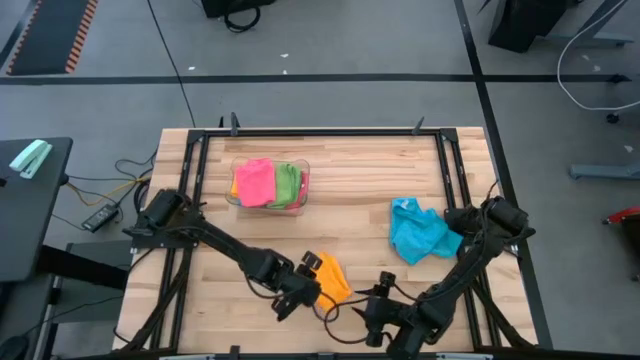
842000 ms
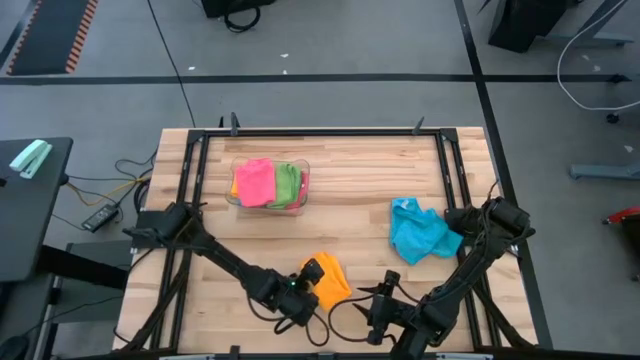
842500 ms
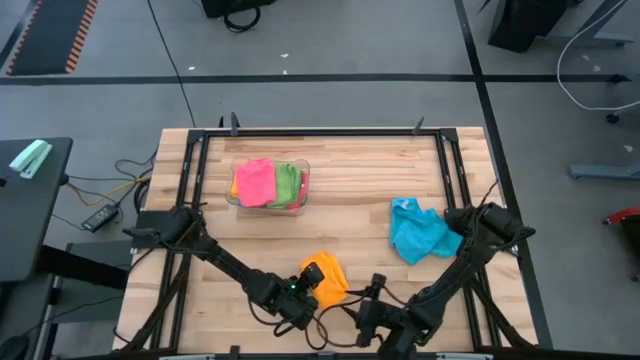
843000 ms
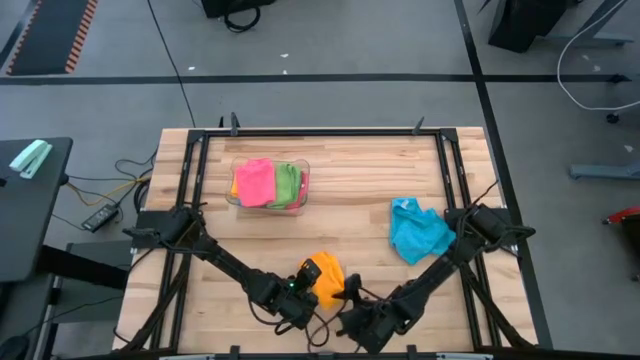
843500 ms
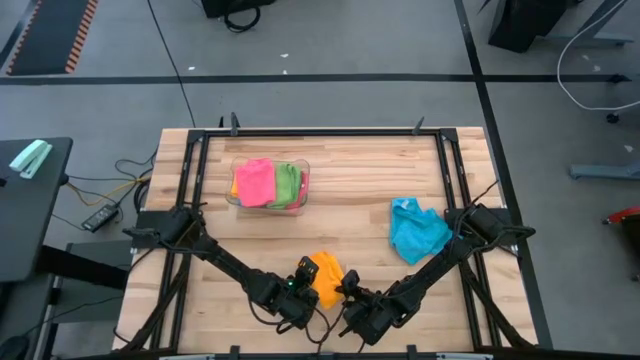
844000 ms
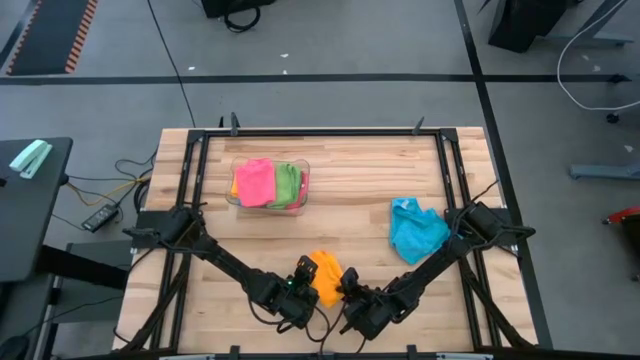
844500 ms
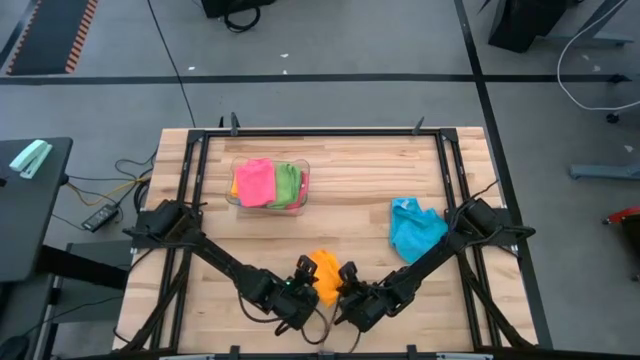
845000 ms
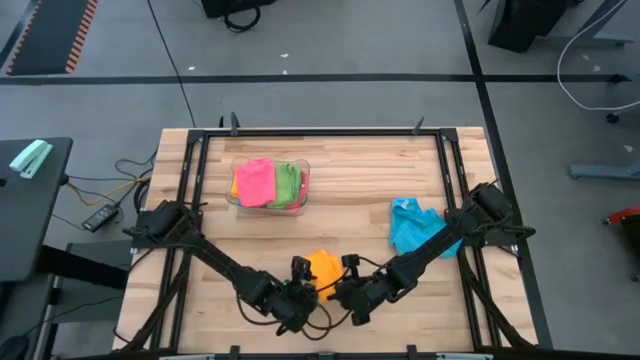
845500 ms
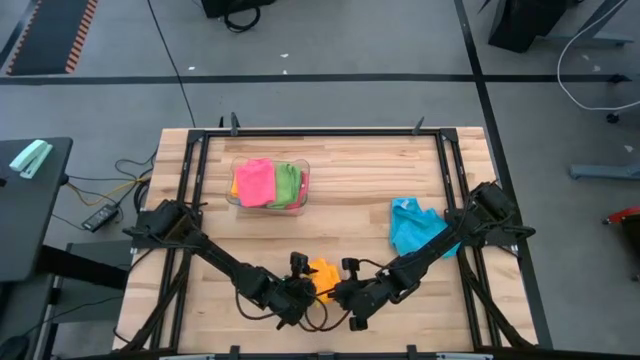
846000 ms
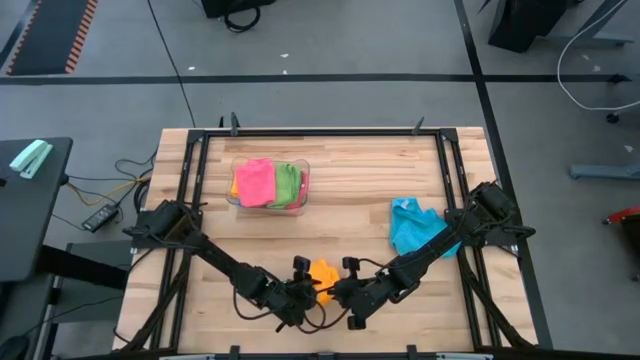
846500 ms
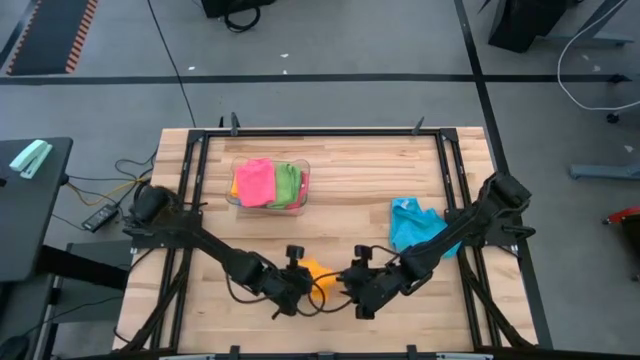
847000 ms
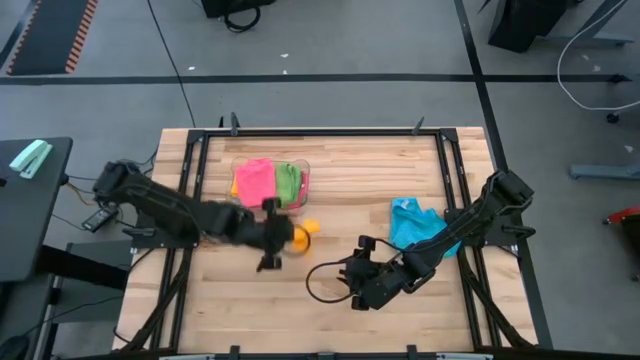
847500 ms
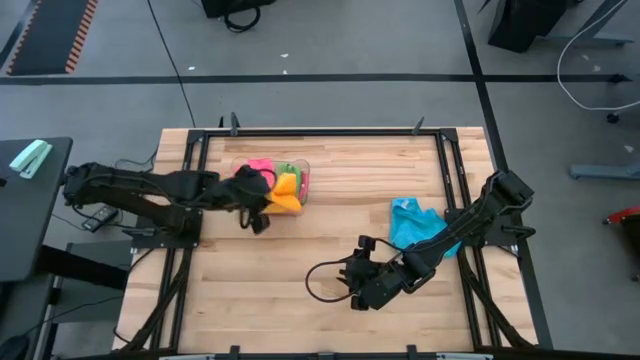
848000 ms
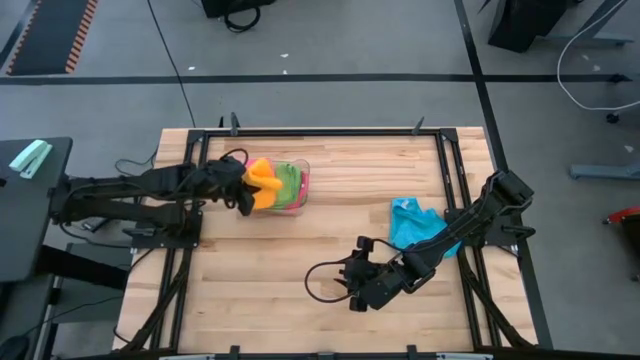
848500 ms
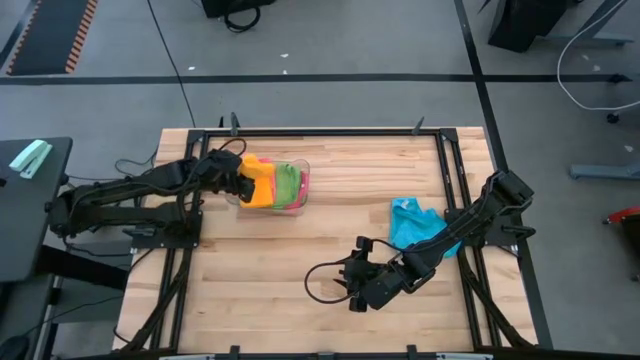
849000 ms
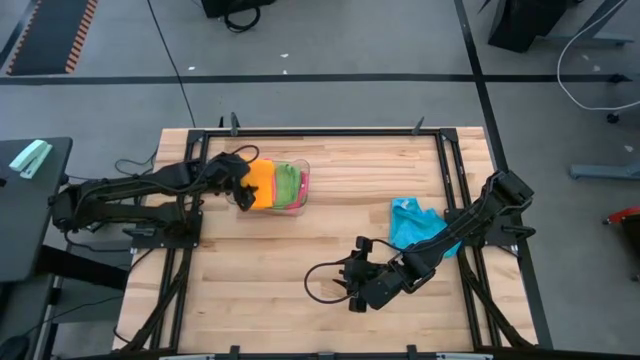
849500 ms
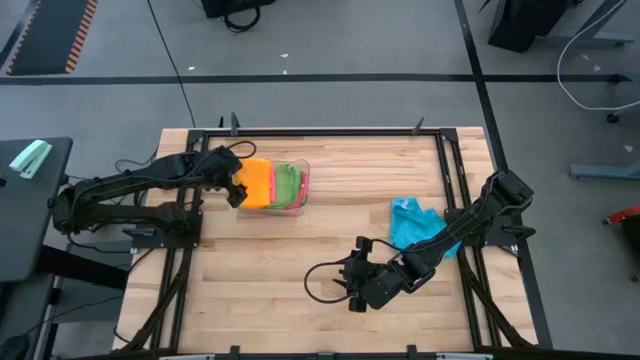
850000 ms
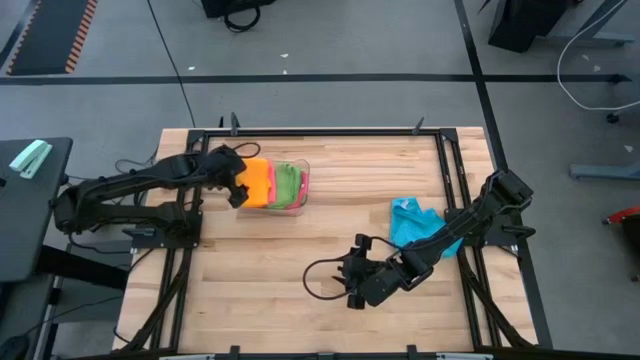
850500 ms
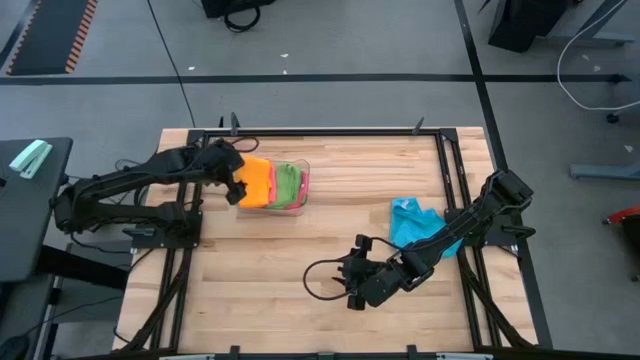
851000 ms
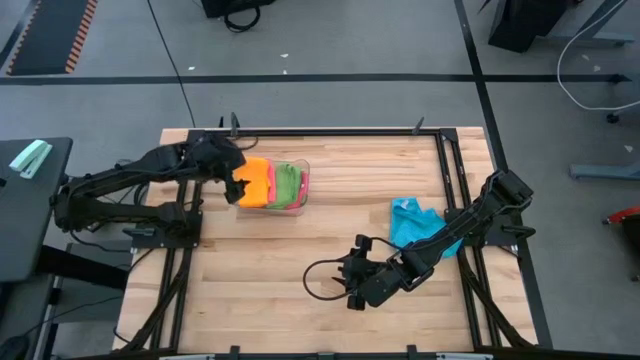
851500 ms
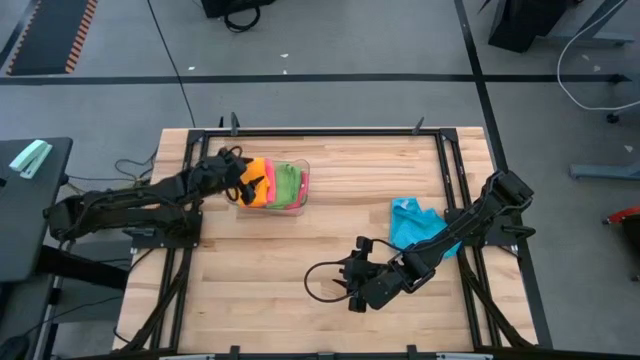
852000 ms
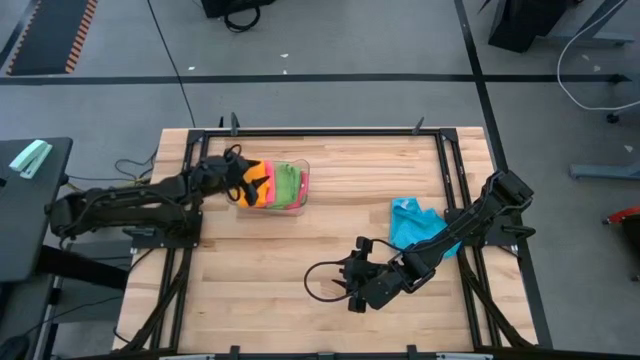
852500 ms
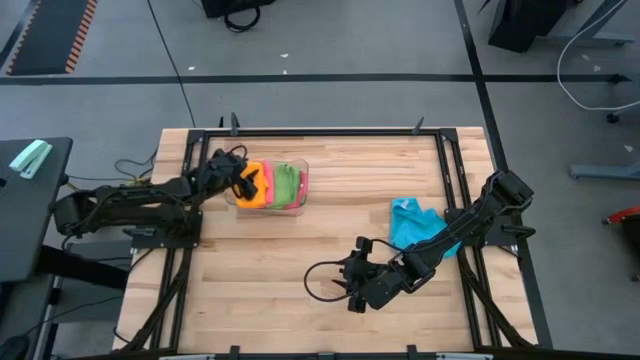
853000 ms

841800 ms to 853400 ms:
Task: Fold microfiber towels
Stack the orange microfiber towel on top of the pink microfiber towel

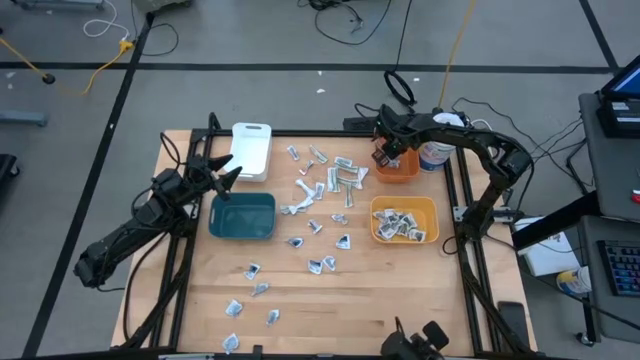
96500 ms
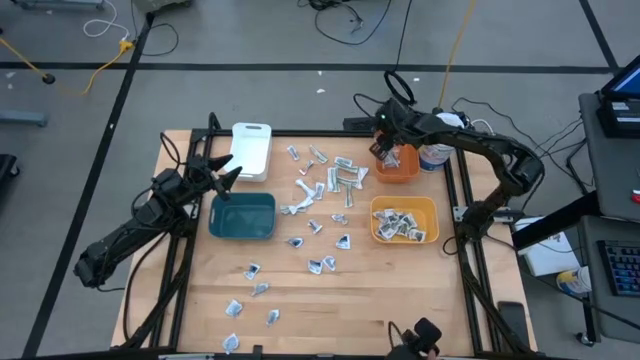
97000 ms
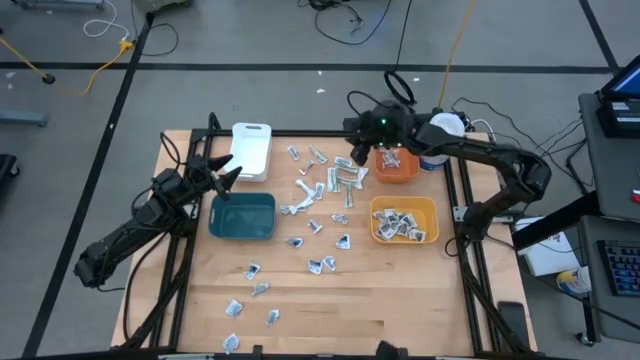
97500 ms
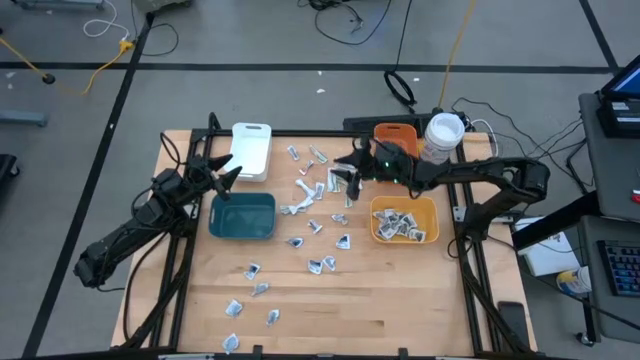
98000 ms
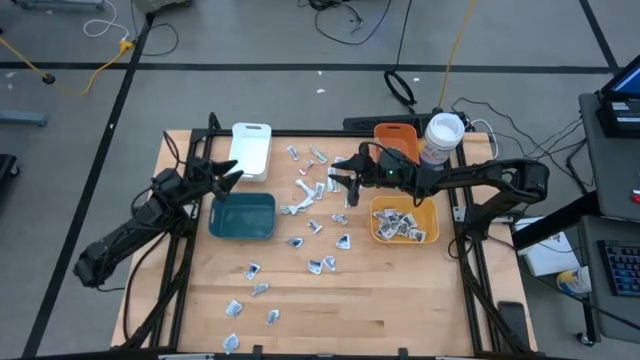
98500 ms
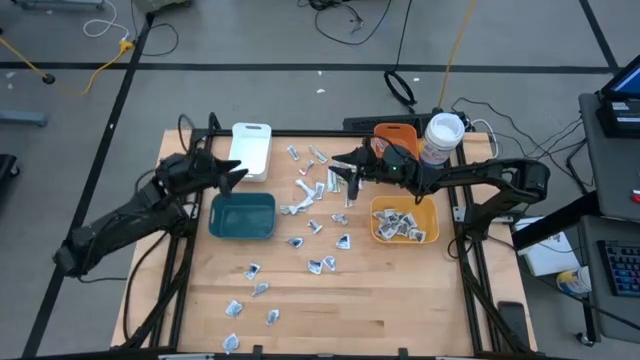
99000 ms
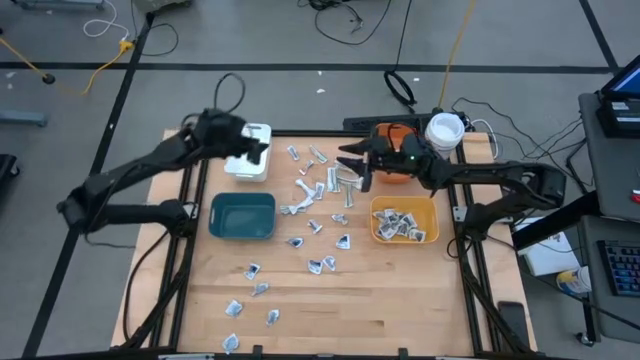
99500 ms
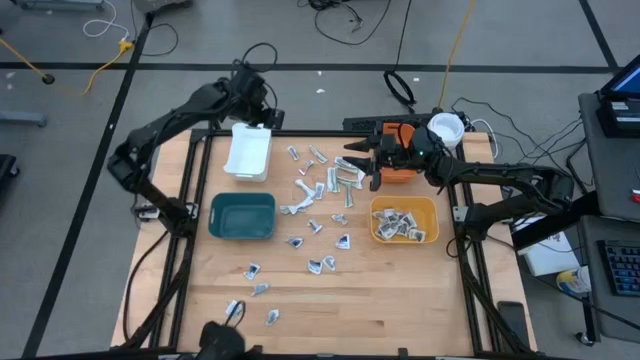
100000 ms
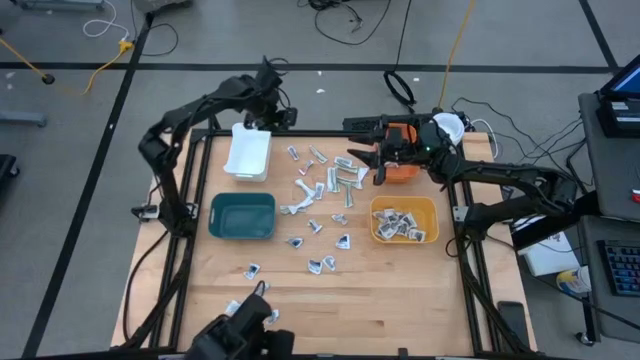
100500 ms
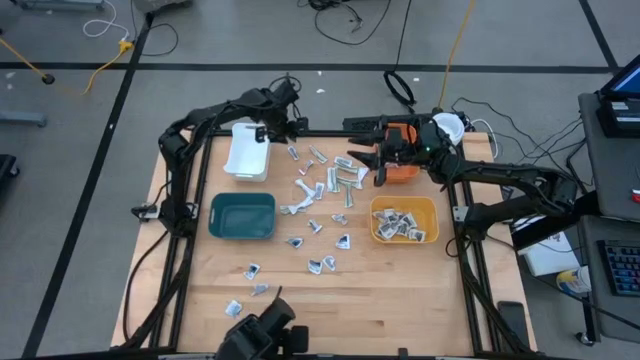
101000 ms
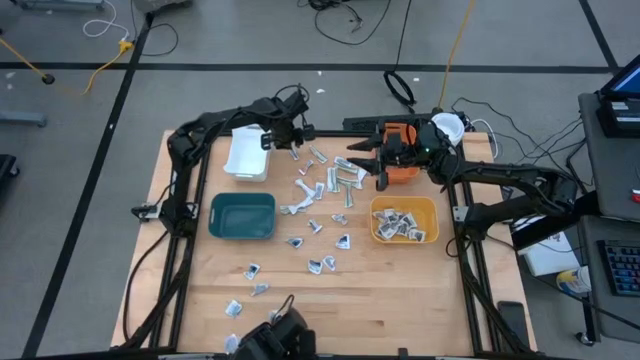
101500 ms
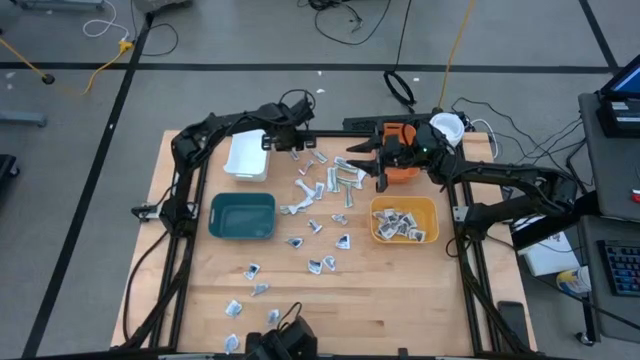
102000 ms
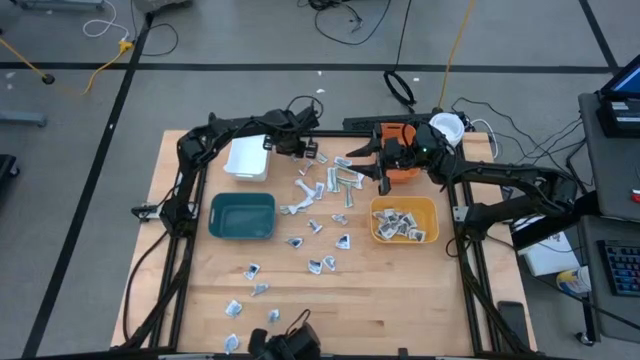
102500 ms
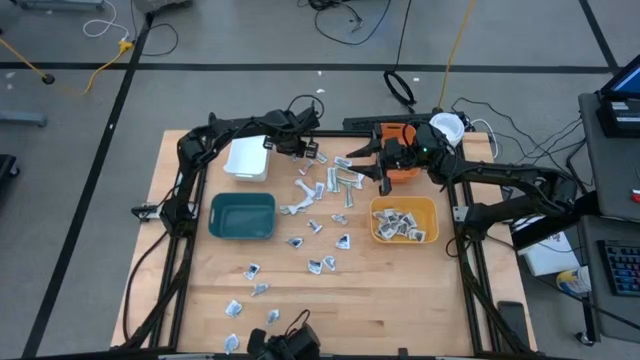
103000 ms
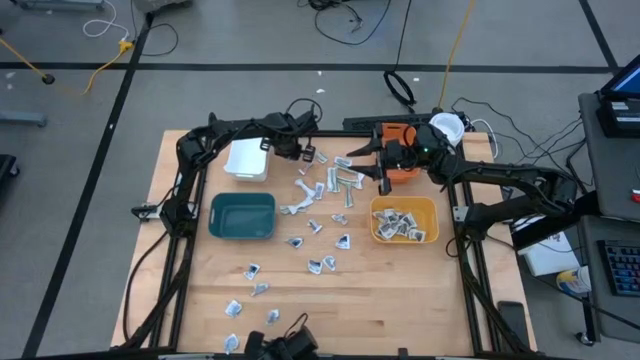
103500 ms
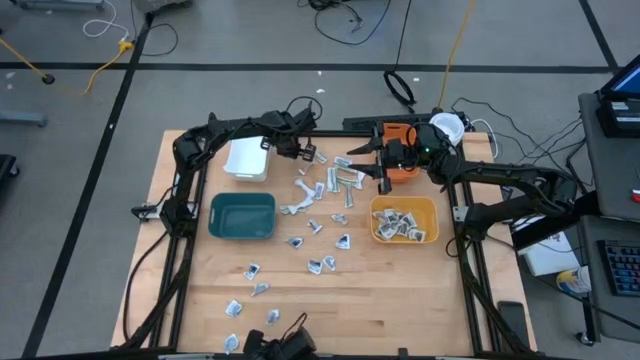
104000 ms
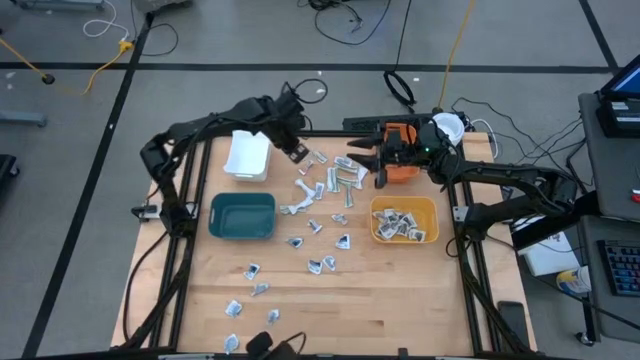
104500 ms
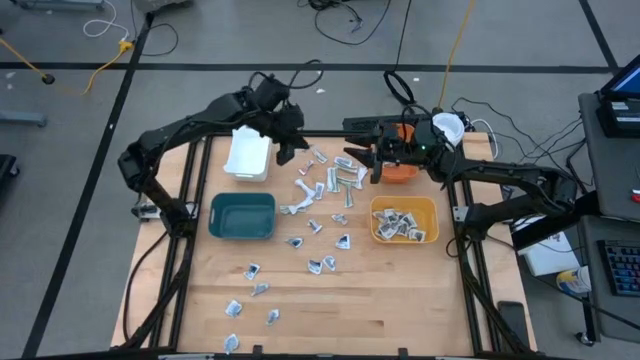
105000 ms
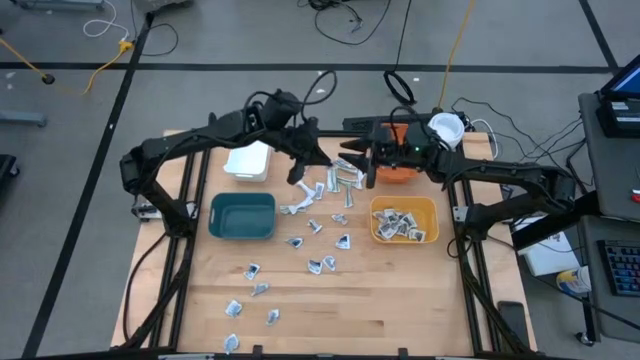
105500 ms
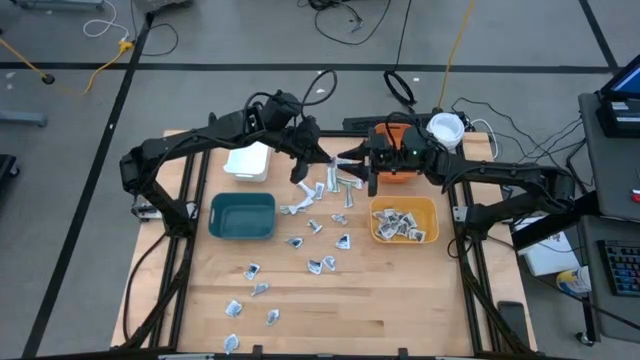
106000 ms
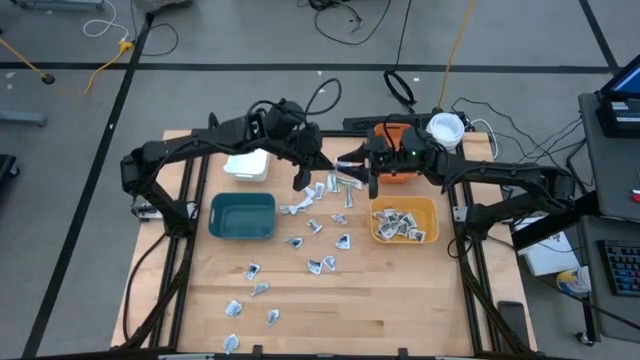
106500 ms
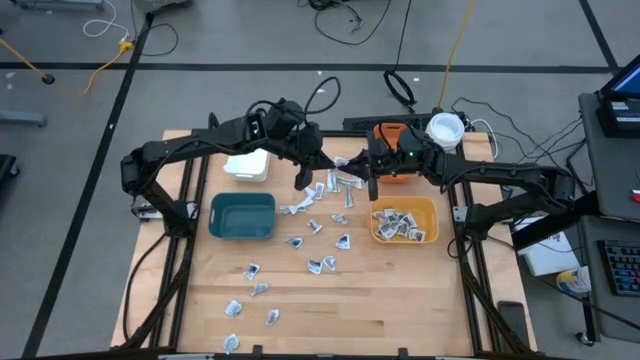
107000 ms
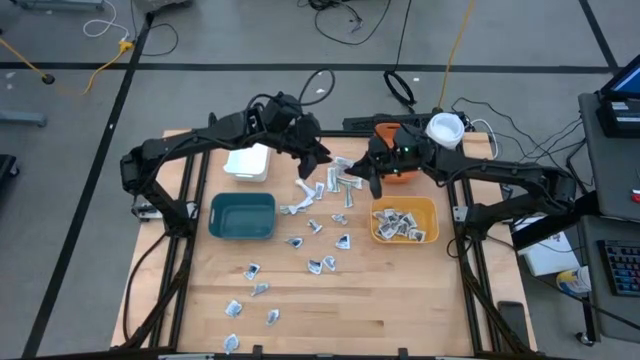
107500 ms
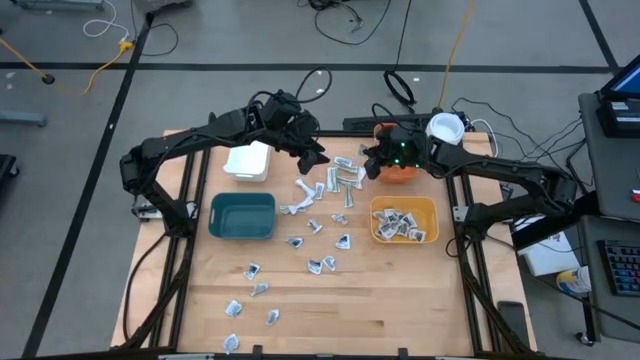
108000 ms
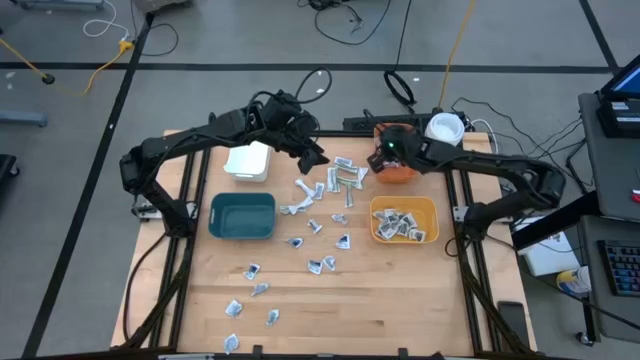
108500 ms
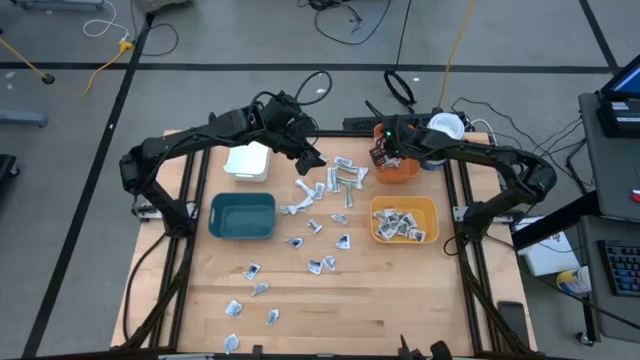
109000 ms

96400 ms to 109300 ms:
Task: Pick & Place First Aid Supplies
Put the antibiotic ointment into the orange bin
